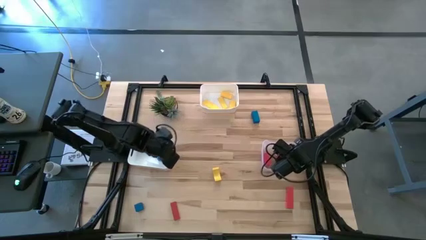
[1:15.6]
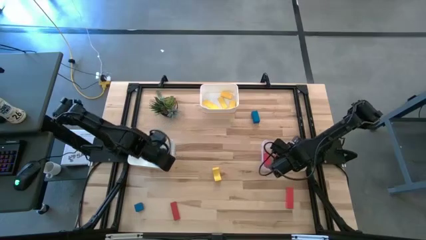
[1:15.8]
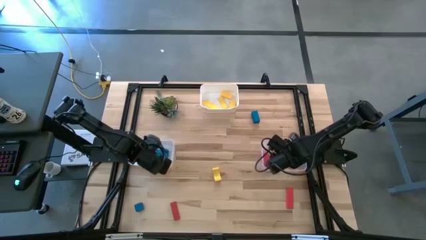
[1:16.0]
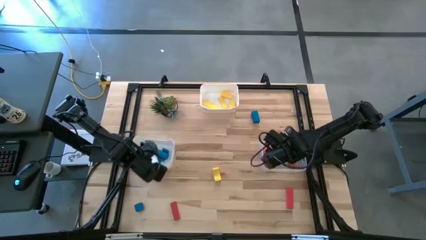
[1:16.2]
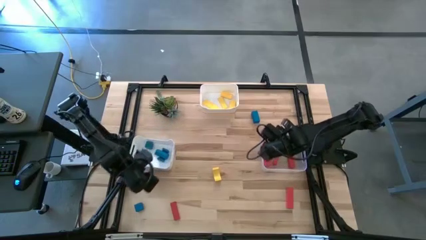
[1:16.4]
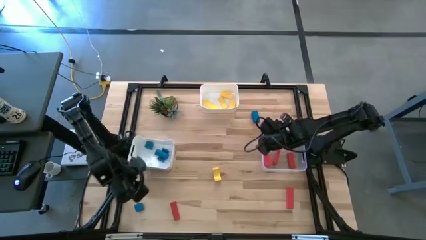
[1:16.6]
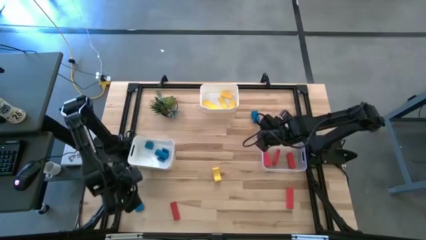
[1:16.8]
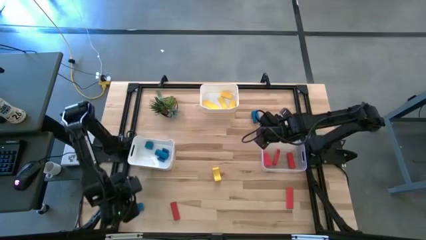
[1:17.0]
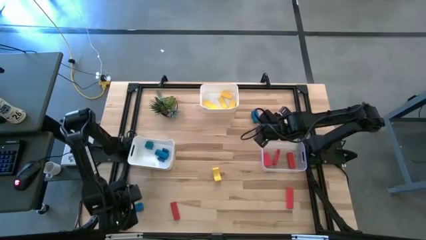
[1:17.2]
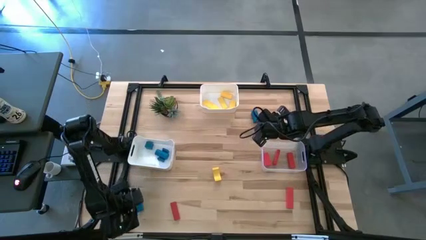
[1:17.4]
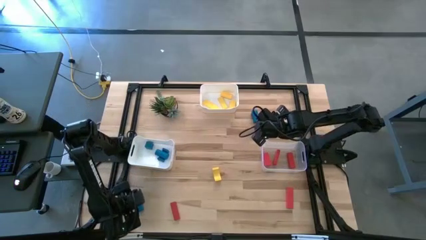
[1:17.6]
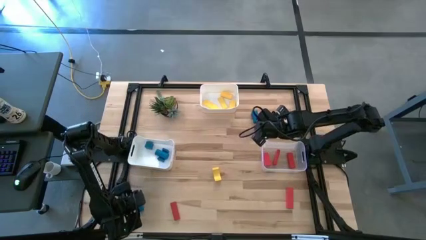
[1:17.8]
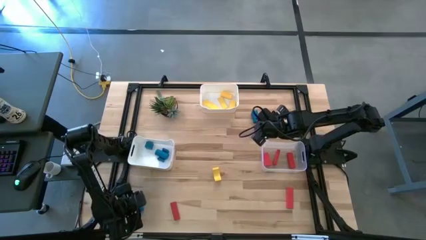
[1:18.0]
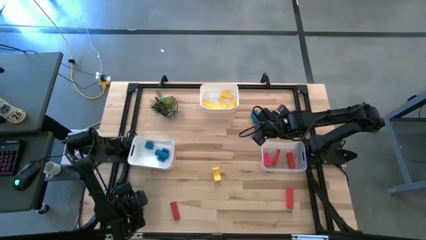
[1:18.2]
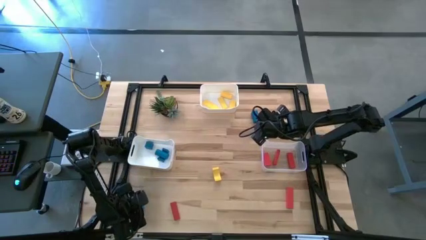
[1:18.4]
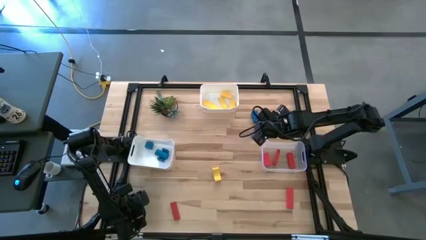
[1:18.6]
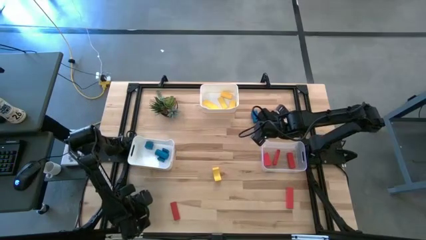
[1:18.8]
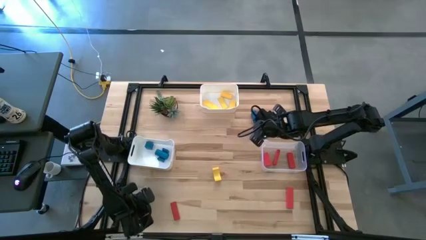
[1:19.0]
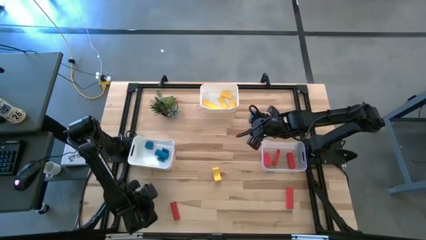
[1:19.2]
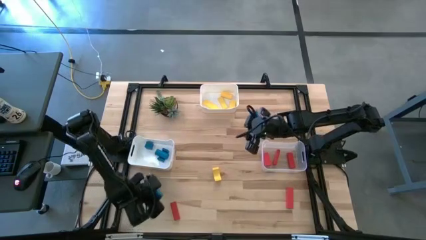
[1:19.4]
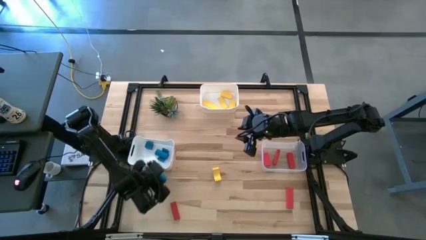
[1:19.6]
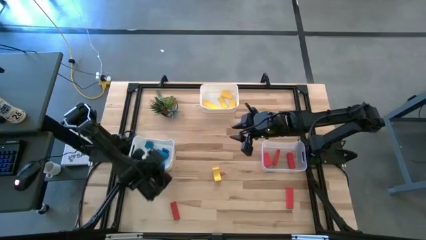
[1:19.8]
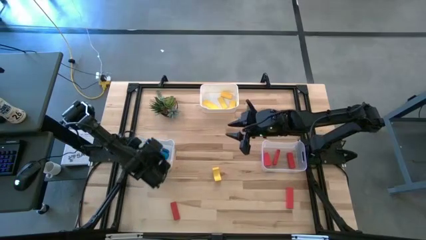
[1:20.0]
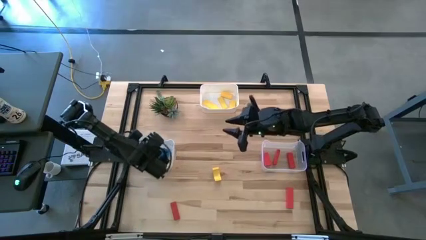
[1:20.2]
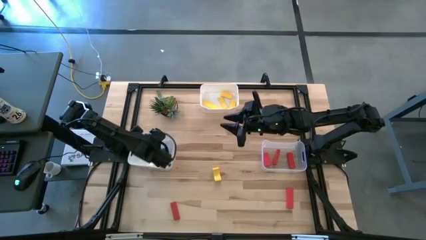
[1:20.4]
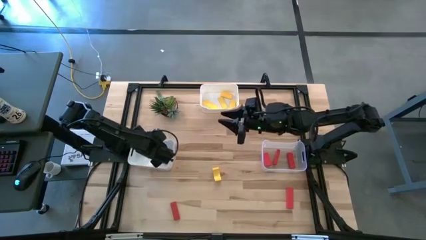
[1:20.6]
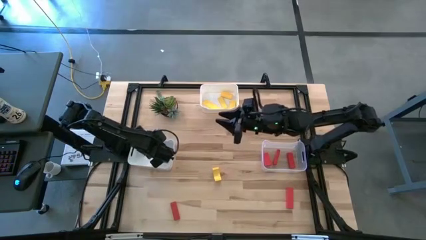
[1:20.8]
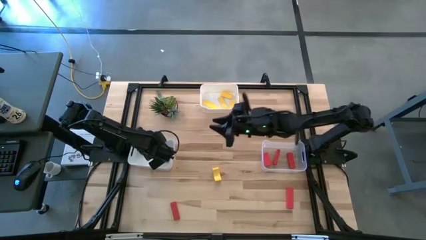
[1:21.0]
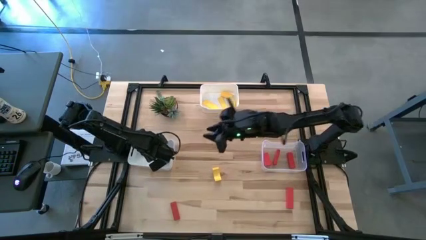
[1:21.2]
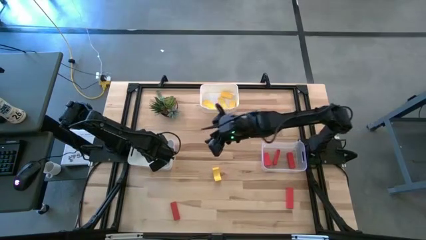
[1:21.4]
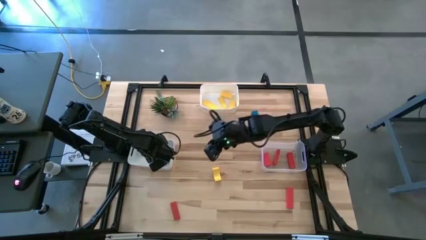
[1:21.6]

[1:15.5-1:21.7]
Task: Sort & place blocks by color
Put the bottom left blue block into the bottom left white bin

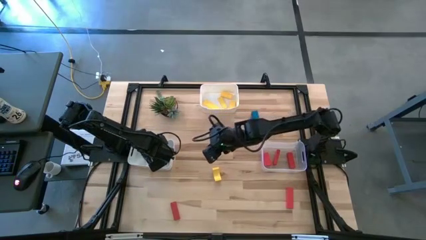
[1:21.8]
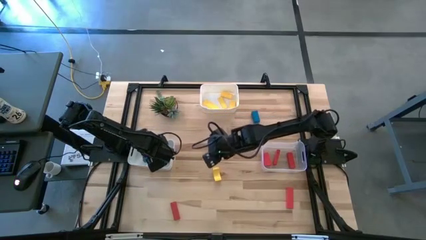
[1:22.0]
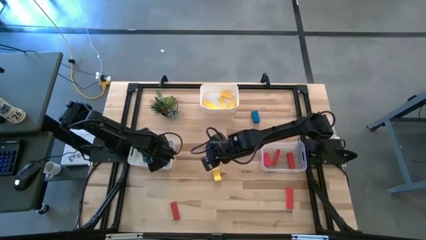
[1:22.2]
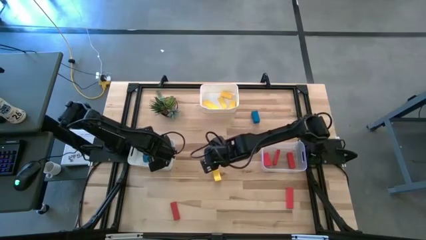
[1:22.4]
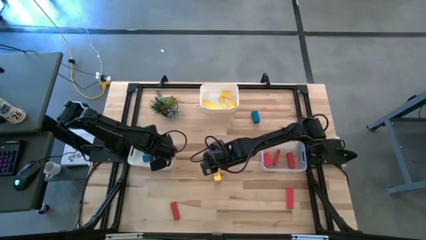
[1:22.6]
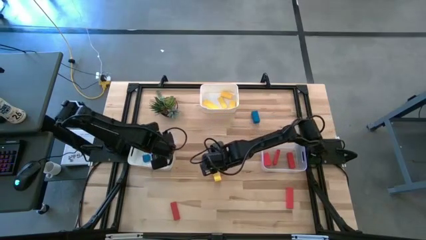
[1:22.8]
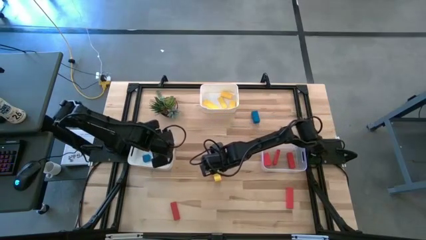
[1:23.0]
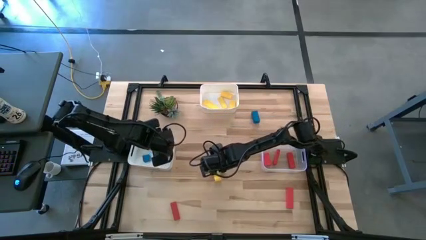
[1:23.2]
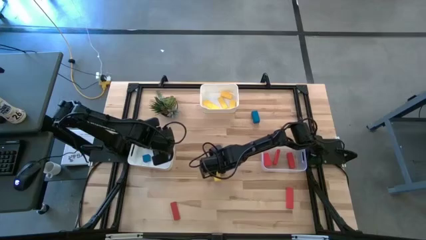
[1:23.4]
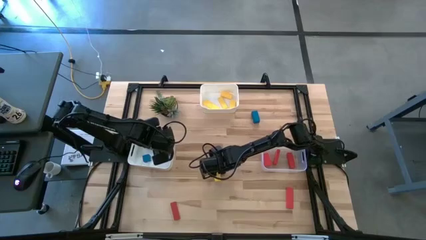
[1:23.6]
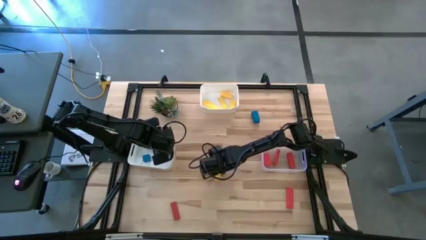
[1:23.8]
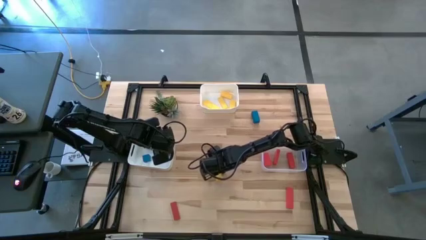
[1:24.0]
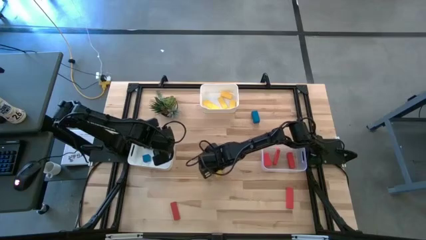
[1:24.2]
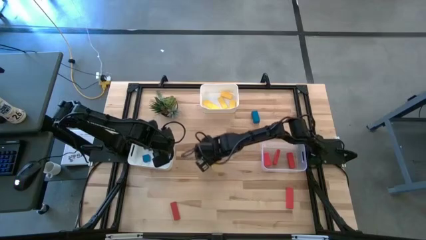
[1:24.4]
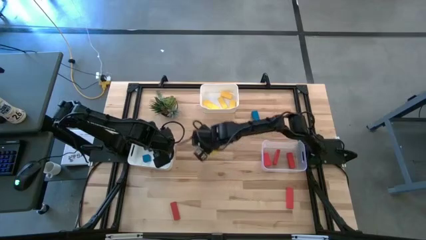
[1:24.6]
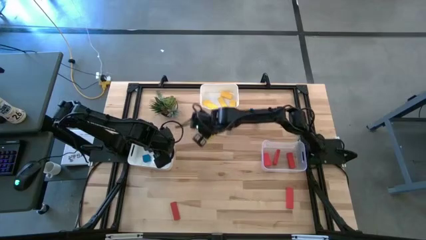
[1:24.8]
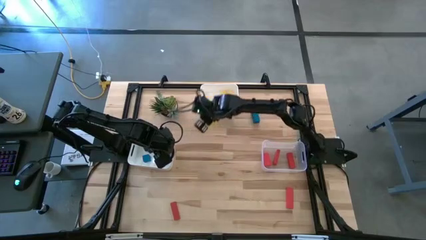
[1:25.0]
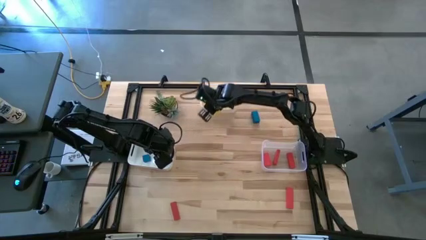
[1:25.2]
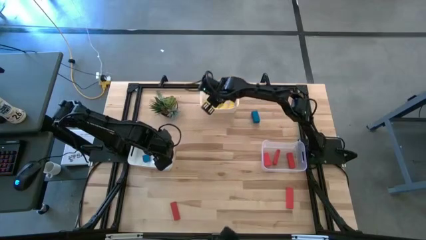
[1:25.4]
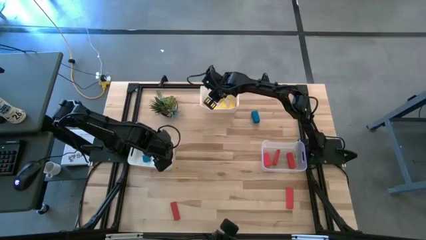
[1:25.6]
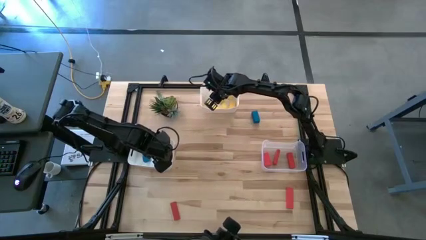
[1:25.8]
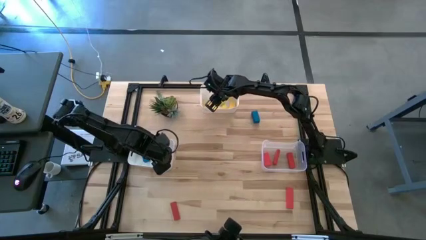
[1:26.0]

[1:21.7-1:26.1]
Put the yellow block into the top white bin

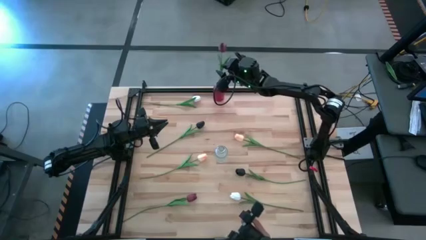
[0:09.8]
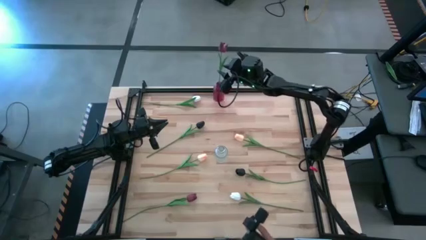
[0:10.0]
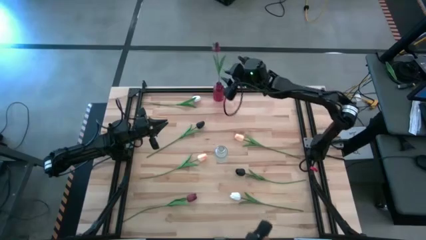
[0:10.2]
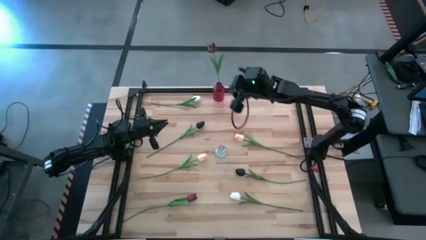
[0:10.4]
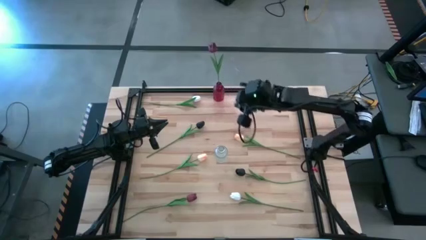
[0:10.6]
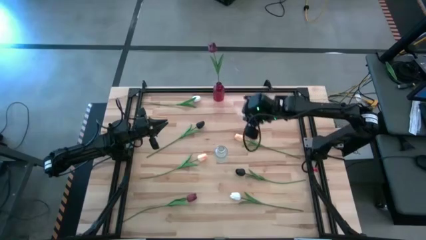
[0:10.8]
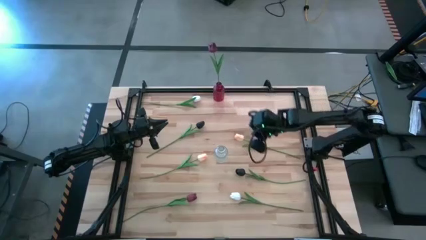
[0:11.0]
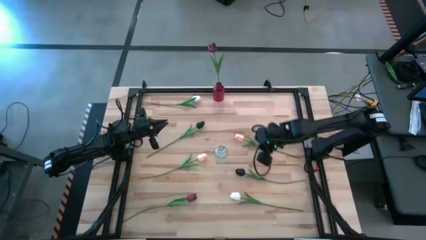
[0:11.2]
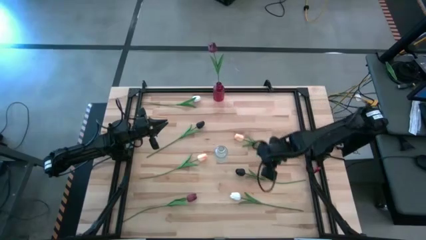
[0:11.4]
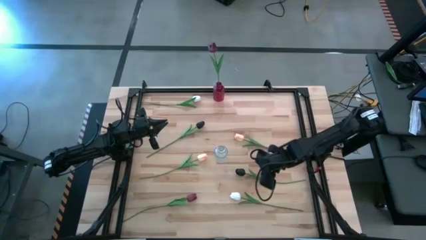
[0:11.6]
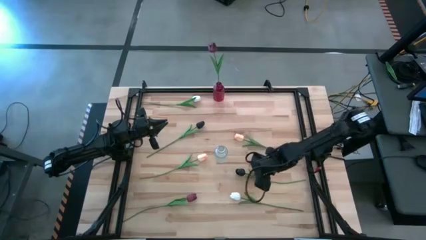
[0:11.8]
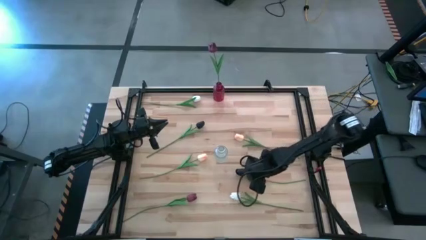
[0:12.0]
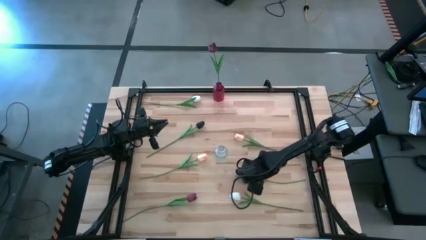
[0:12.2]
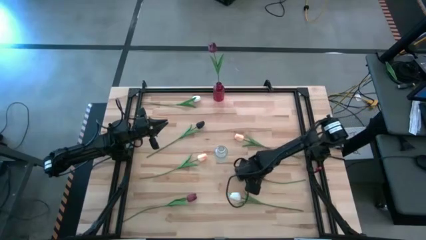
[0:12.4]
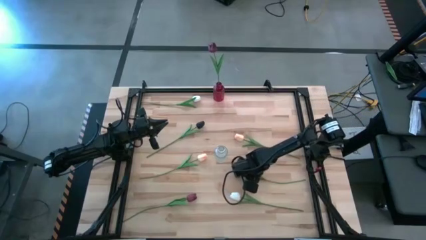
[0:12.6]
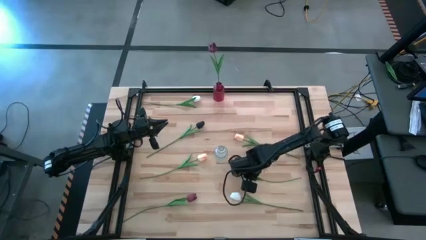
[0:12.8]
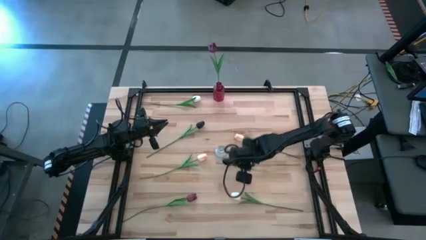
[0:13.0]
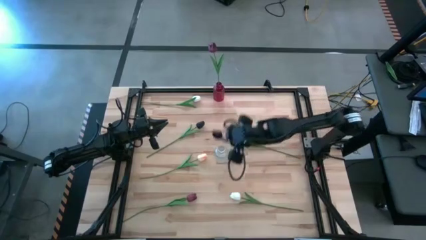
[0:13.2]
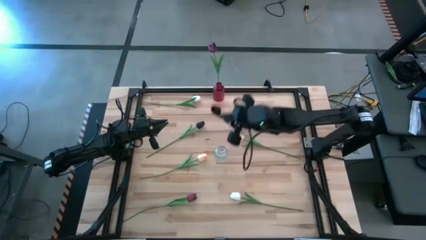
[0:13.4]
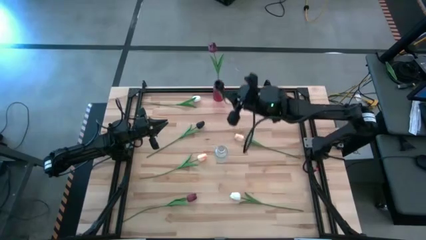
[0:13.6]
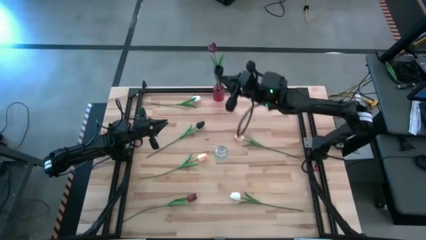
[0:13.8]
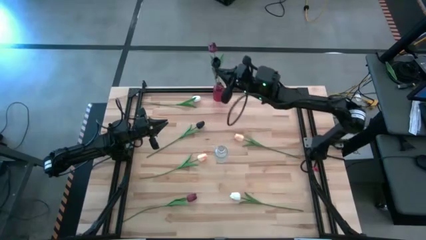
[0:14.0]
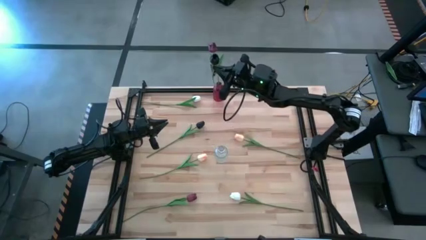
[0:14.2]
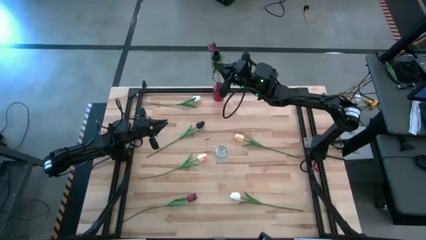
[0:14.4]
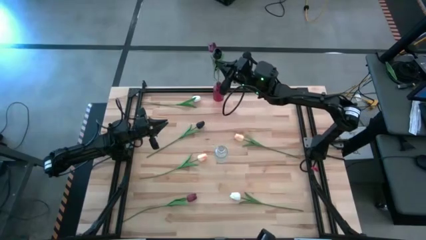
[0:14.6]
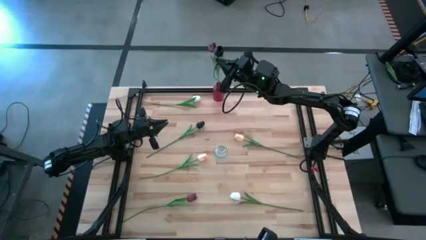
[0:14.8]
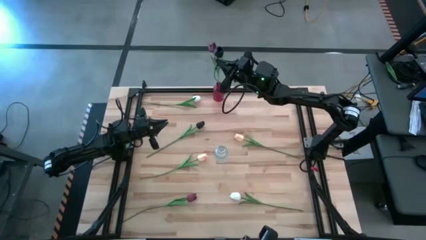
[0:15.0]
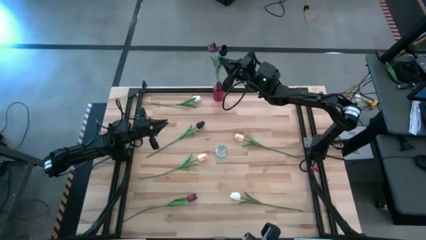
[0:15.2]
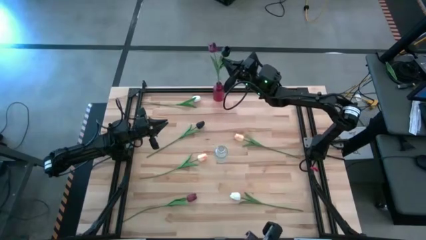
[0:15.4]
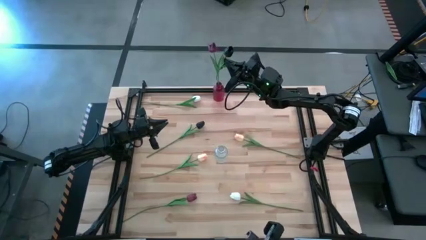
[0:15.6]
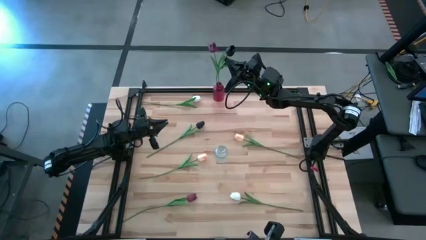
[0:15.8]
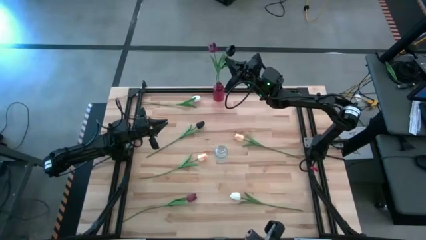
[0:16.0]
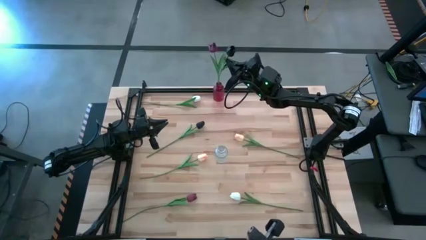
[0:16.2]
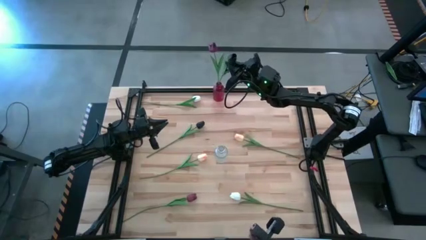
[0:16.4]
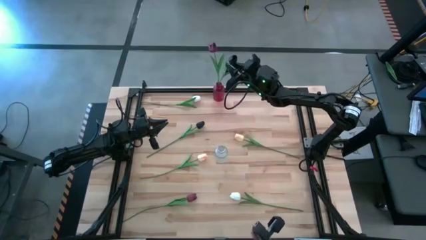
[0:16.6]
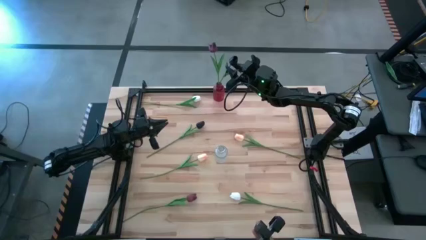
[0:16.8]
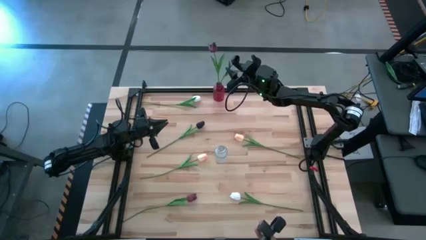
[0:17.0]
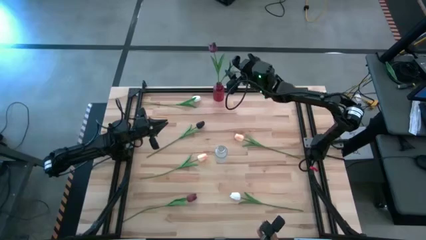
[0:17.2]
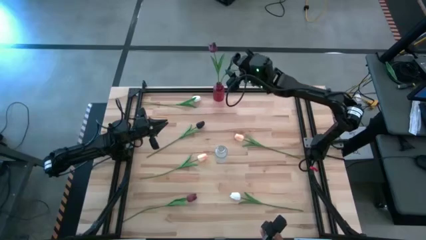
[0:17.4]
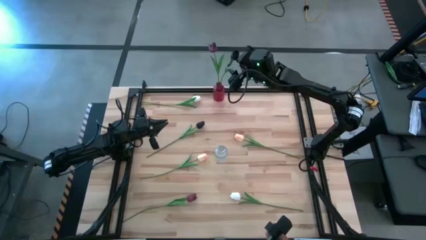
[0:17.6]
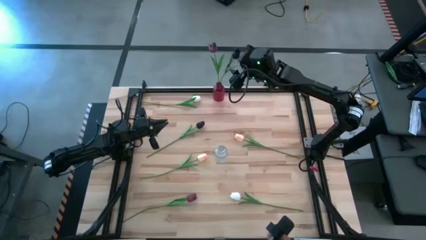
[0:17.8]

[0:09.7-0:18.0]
Task: Sort flowers into vase by color
Put the bottom black tulip into the red vase
